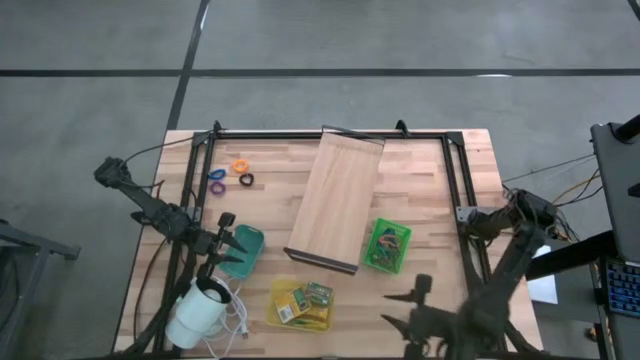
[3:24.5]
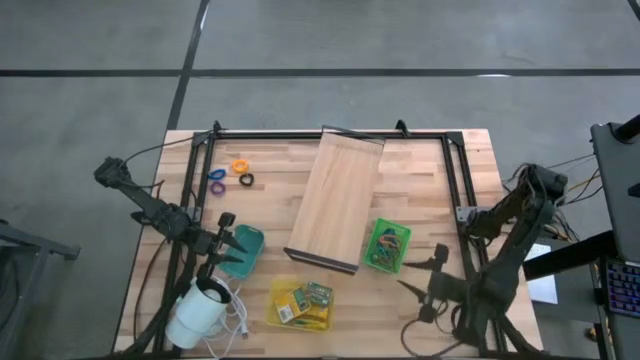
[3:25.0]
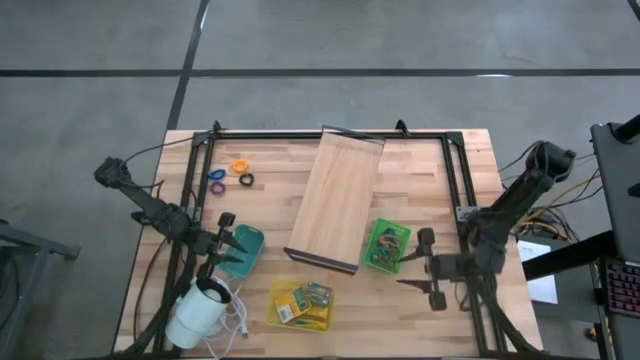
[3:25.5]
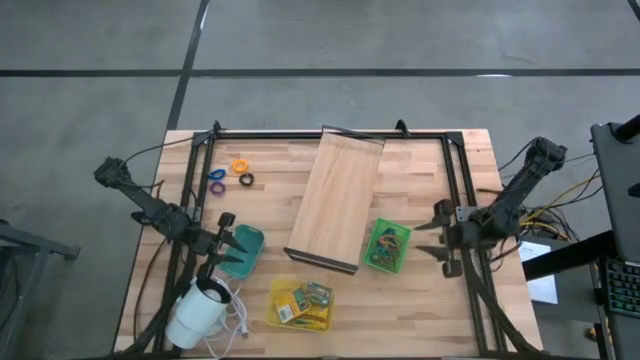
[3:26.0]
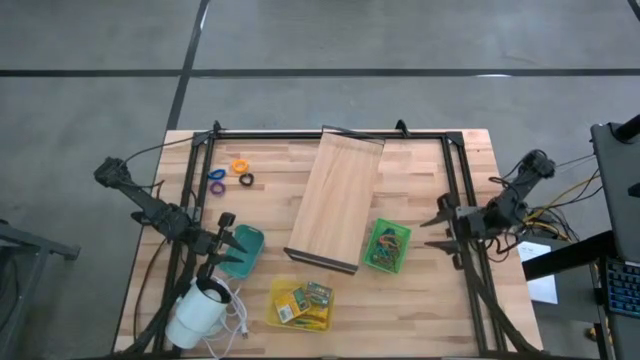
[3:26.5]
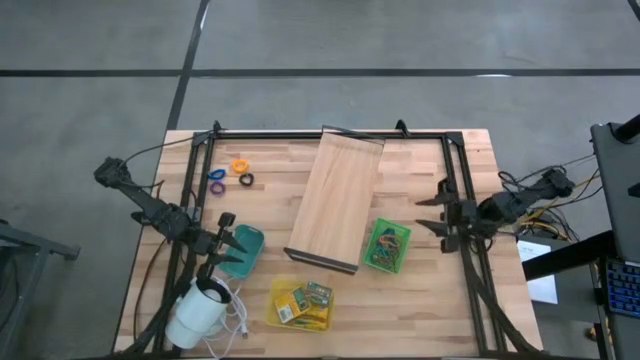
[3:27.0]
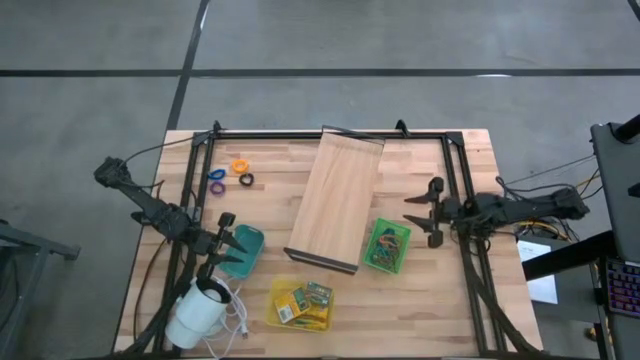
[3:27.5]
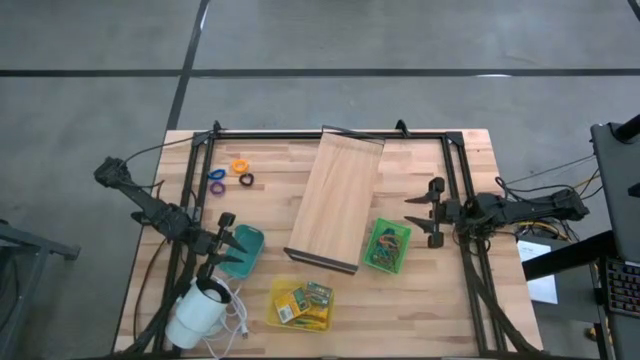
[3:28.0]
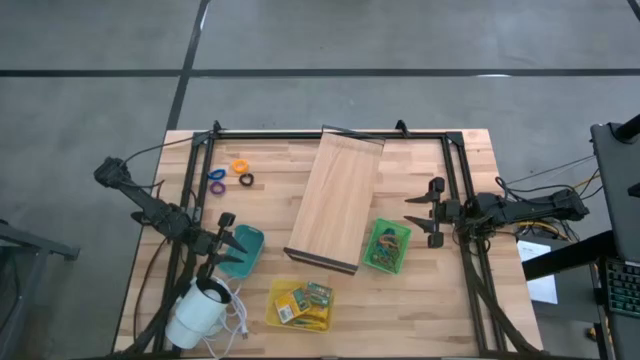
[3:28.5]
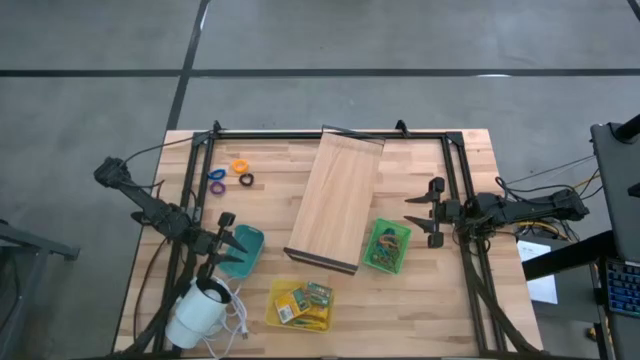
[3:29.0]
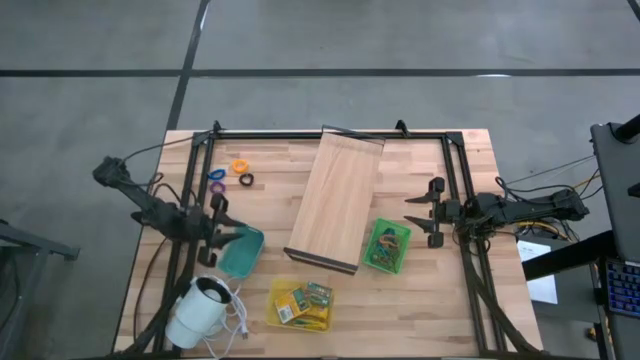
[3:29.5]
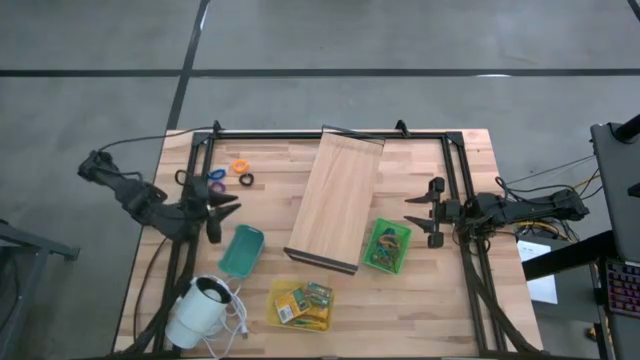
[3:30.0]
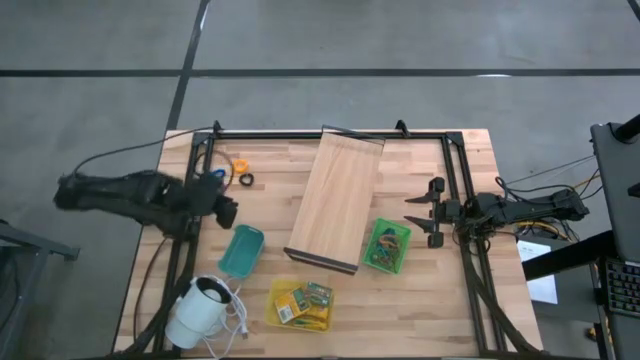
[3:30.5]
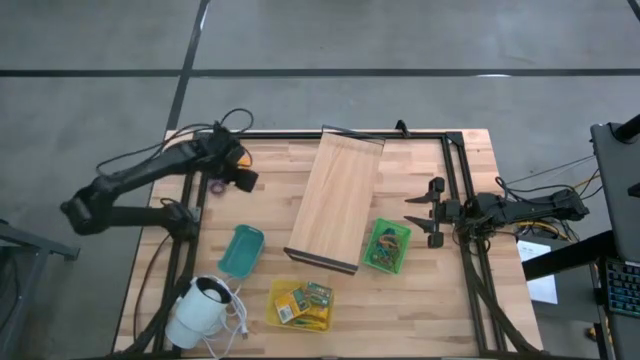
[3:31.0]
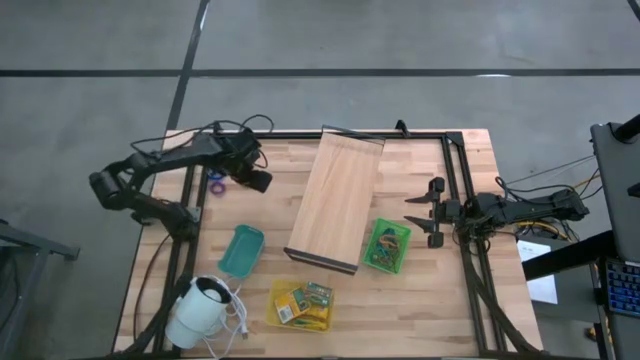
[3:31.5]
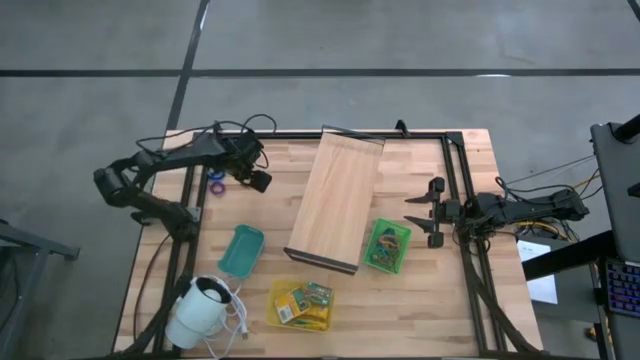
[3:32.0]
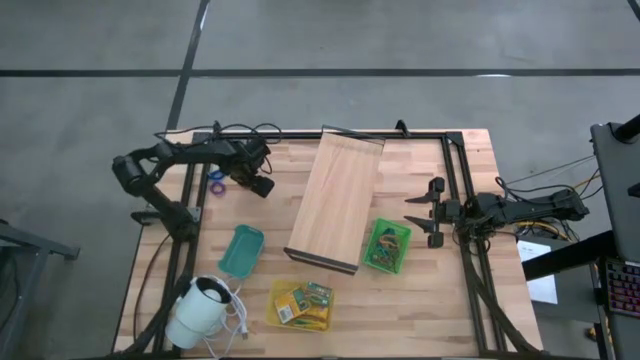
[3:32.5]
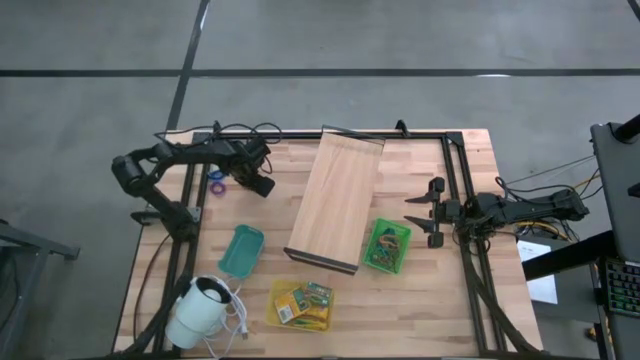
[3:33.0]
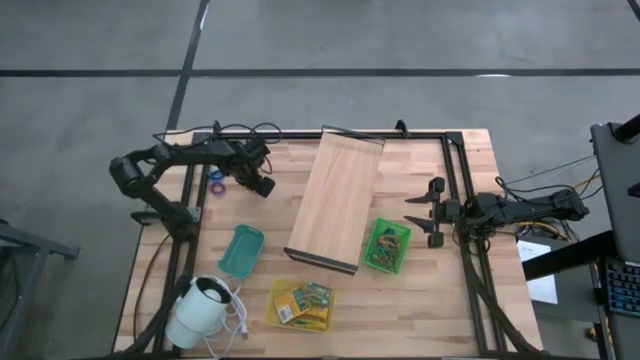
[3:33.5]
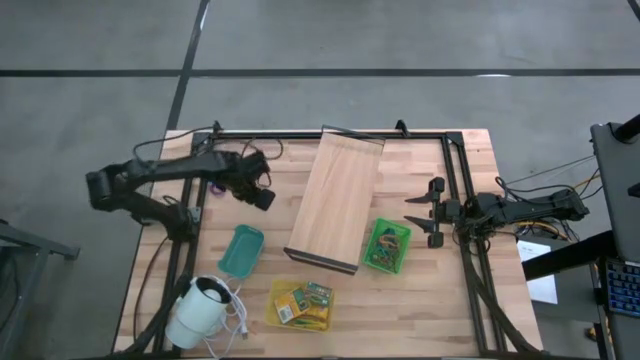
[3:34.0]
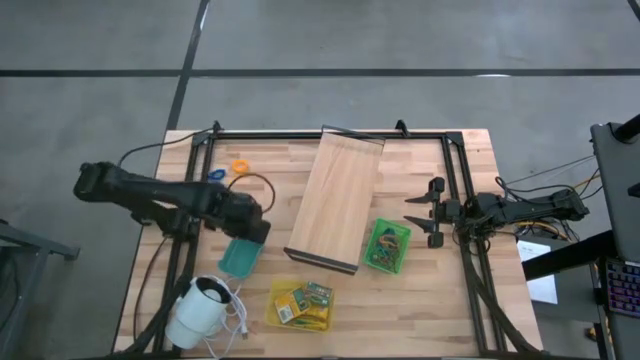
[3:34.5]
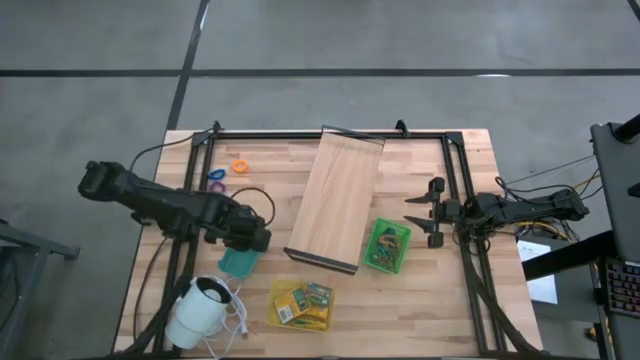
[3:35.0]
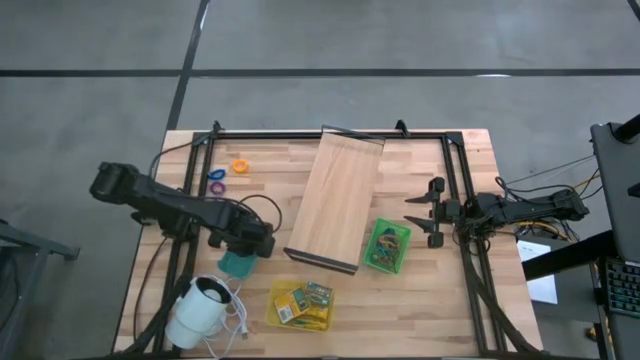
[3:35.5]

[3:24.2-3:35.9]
Task: Pick & Place Office Desk Supplies
Put the black spring keychain into the blue bin

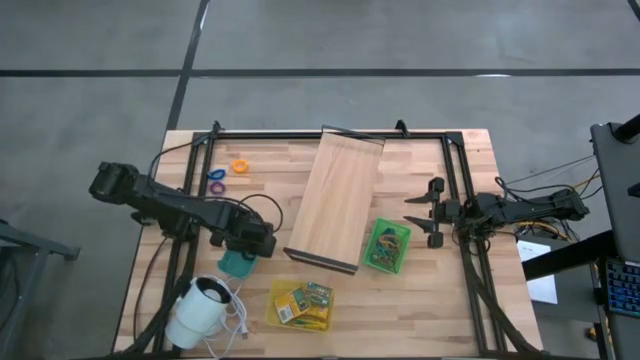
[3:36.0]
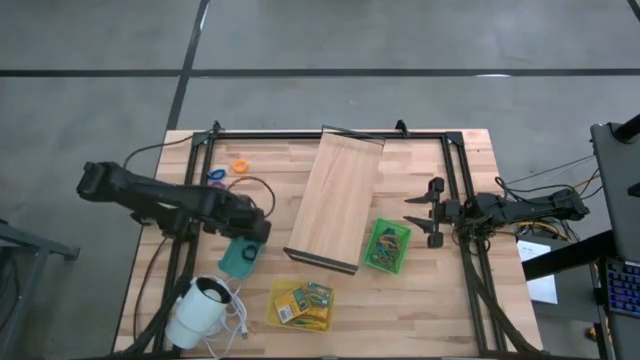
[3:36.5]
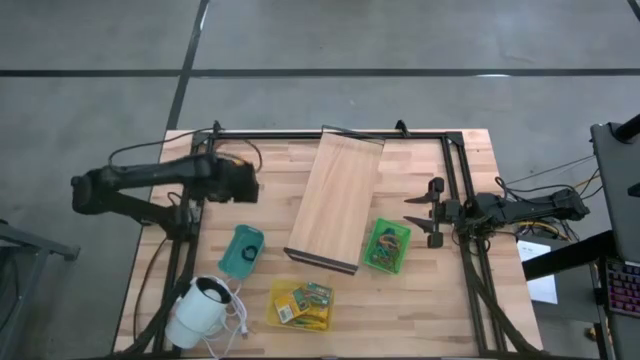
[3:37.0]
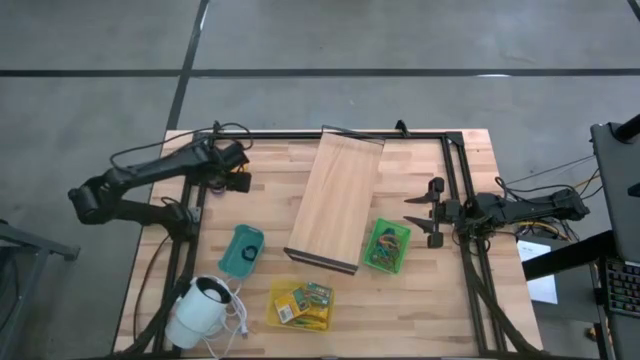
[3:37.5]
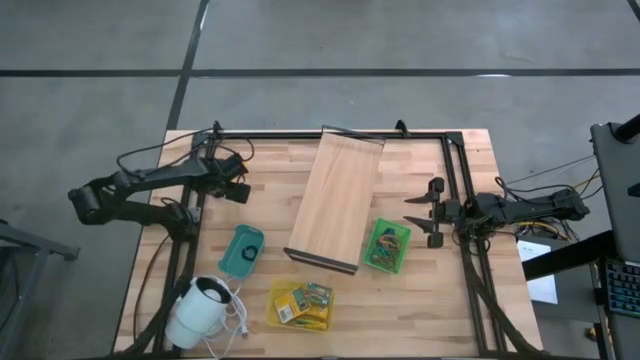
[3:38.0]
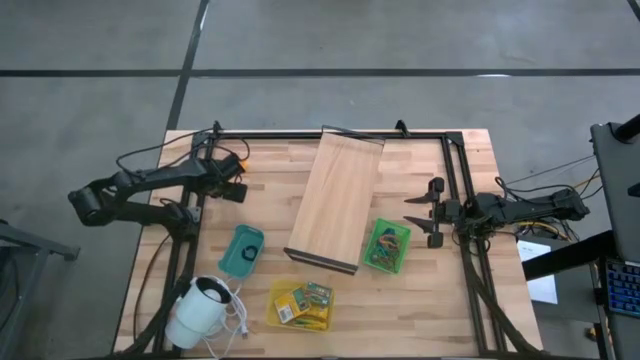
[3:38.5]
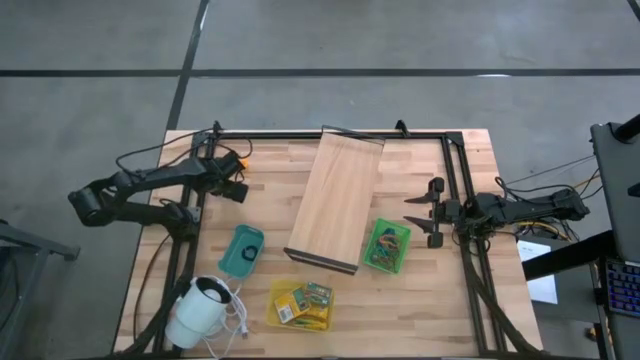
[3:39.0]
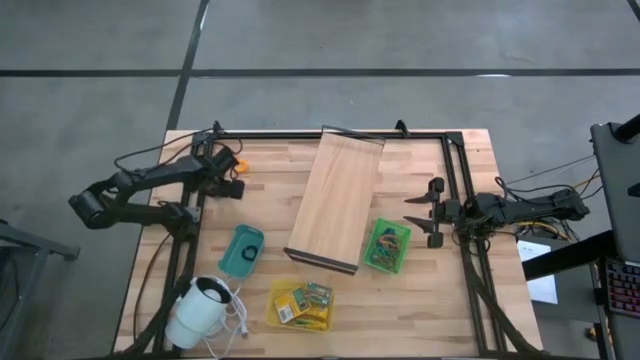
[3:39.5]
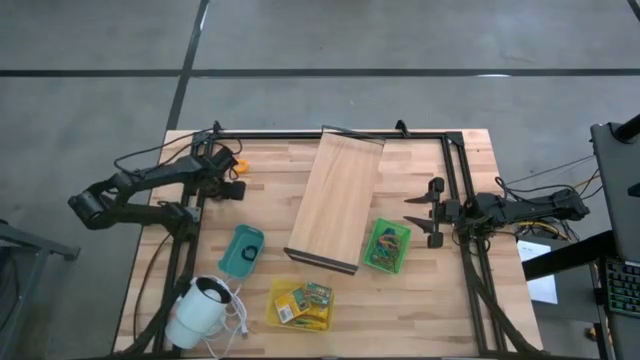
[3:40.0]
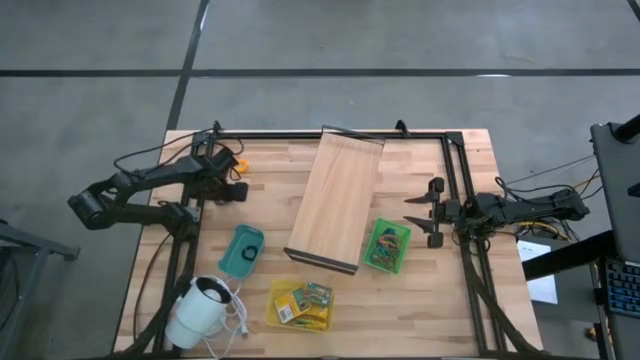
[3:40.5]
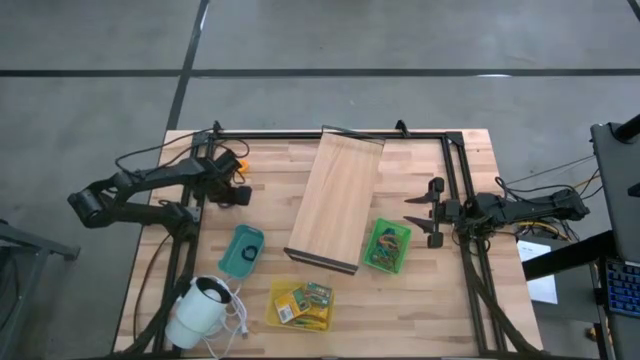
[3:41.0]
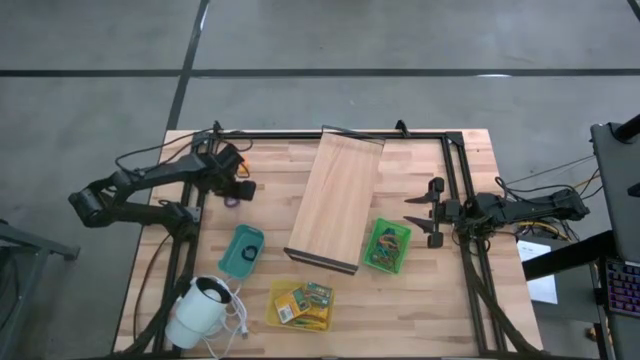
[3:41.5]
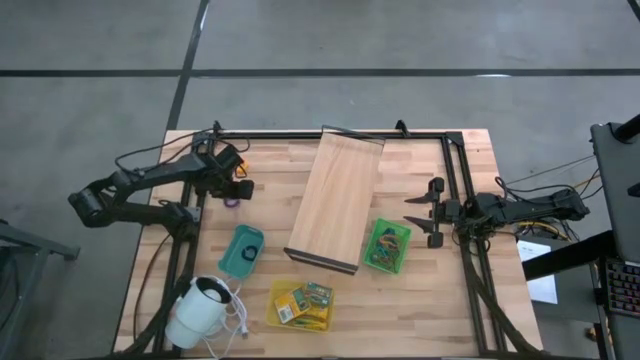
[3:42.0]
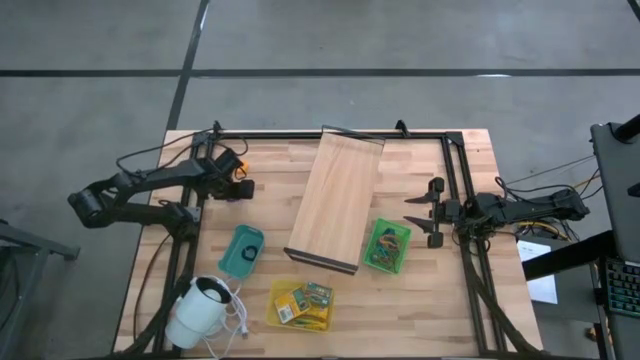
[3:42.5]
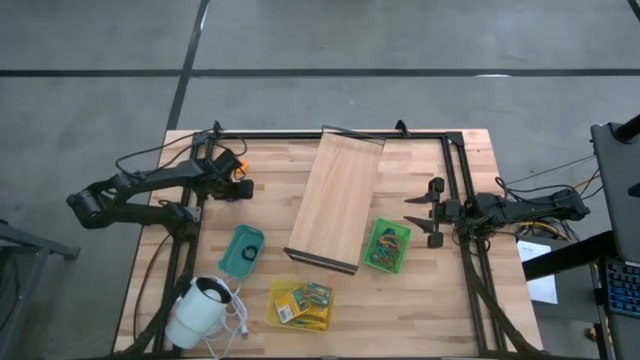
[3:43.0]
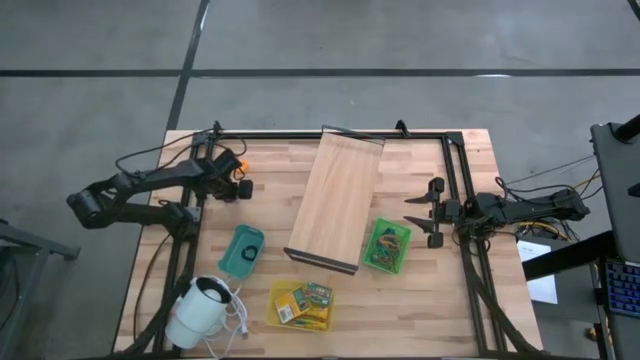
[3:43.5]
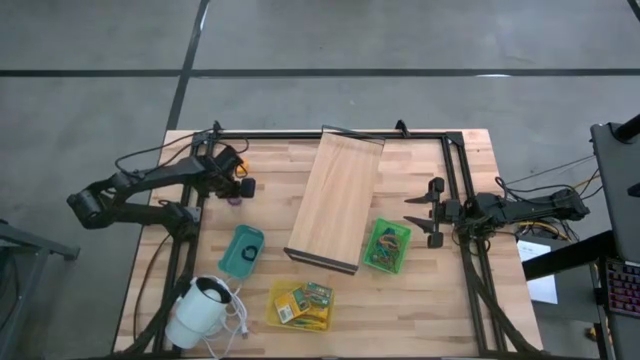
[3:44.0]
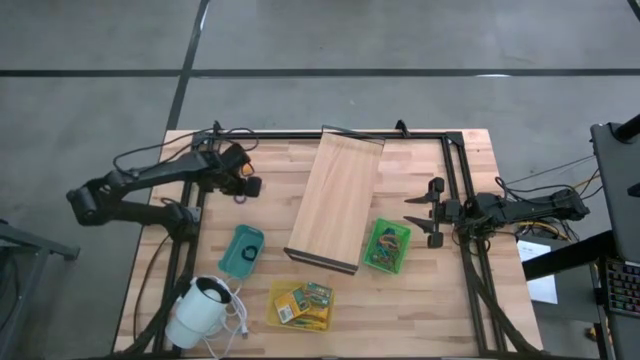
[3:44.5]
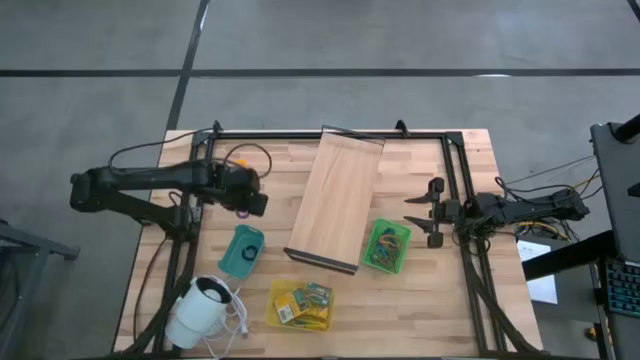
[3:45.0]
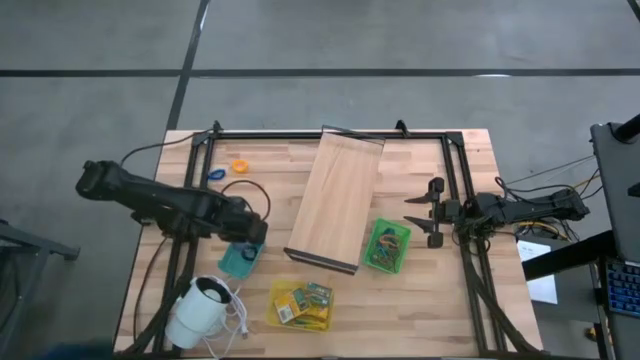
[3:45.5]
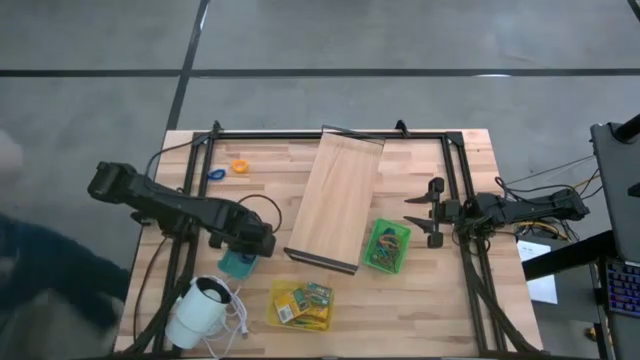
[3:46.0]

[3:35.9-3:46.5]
Put the purple spring keychain into the blue bin
